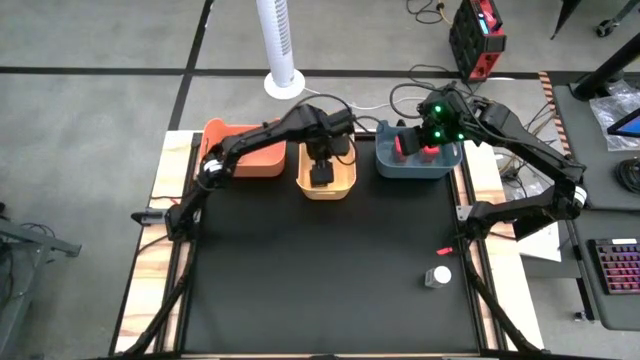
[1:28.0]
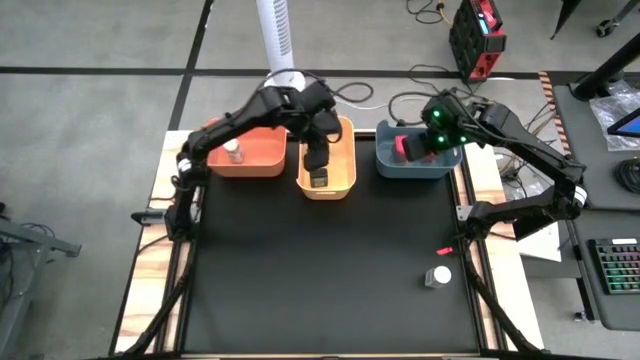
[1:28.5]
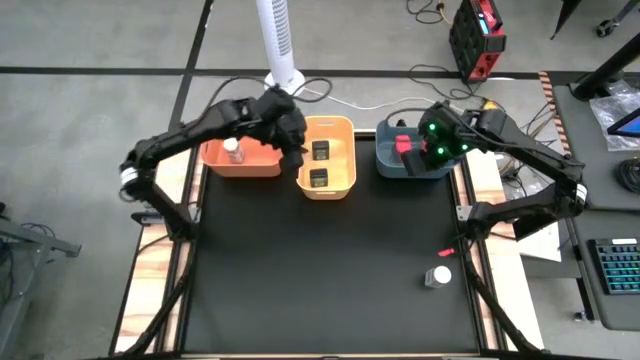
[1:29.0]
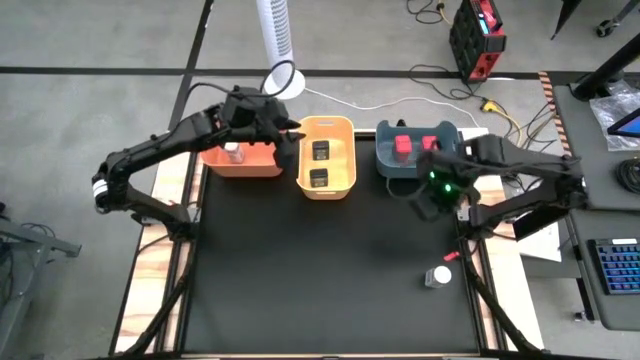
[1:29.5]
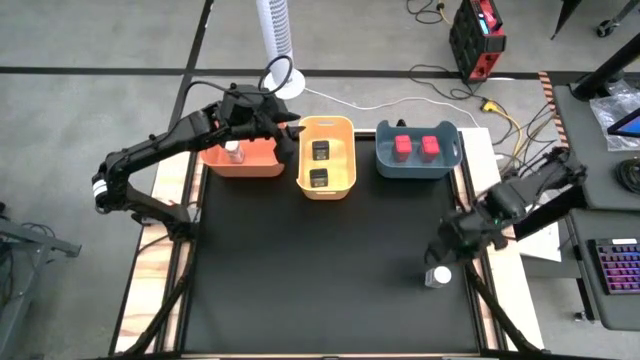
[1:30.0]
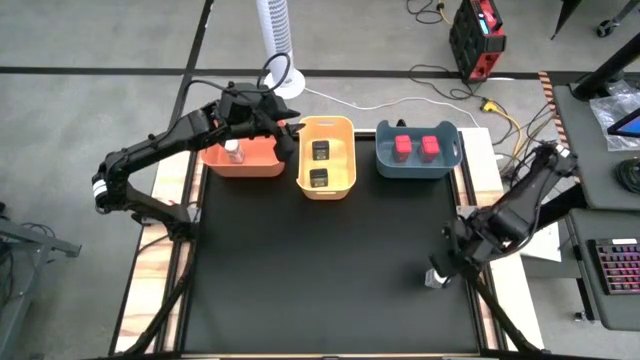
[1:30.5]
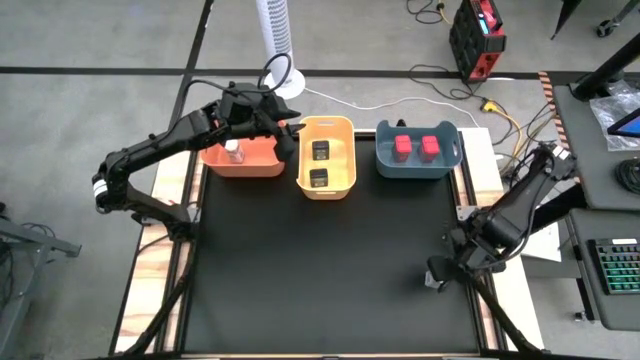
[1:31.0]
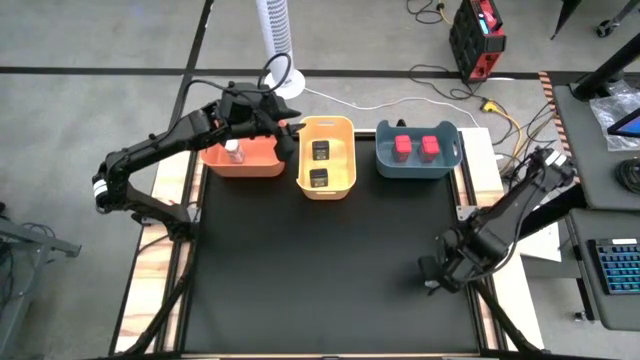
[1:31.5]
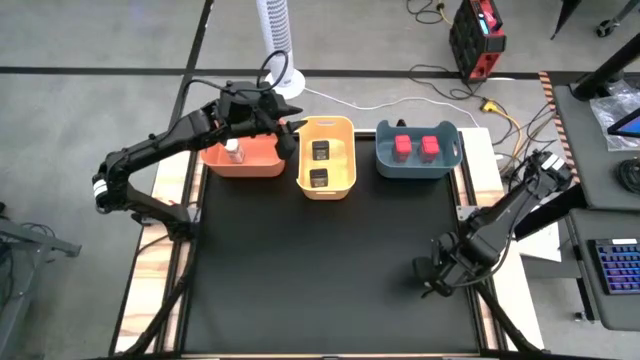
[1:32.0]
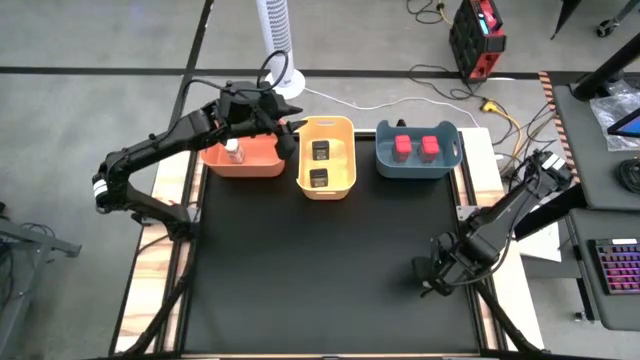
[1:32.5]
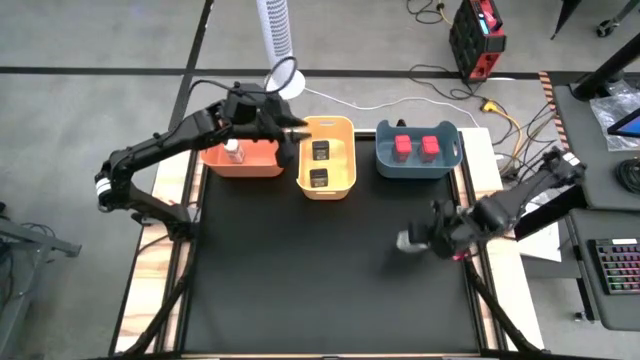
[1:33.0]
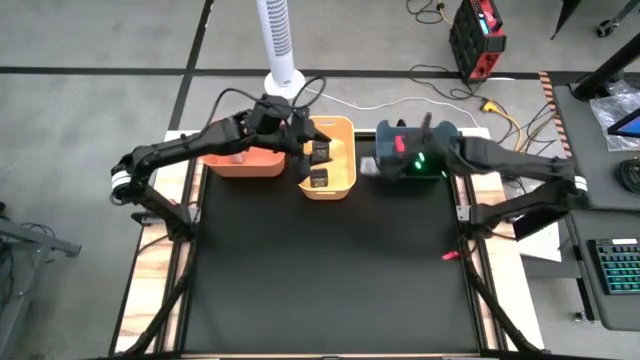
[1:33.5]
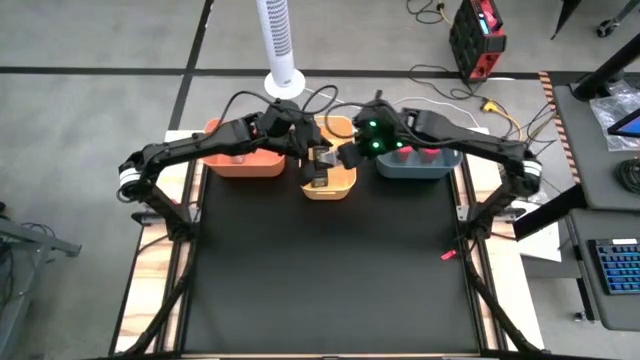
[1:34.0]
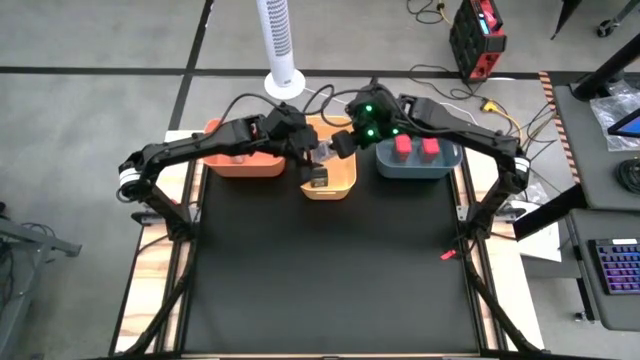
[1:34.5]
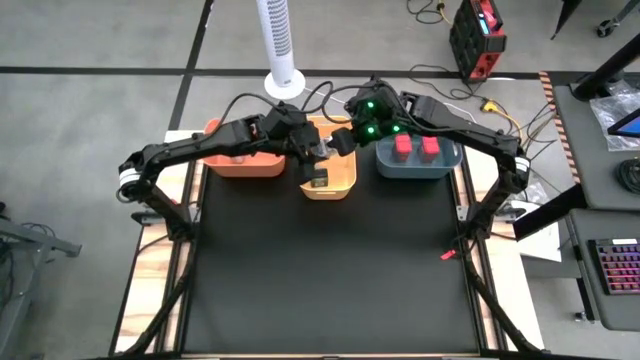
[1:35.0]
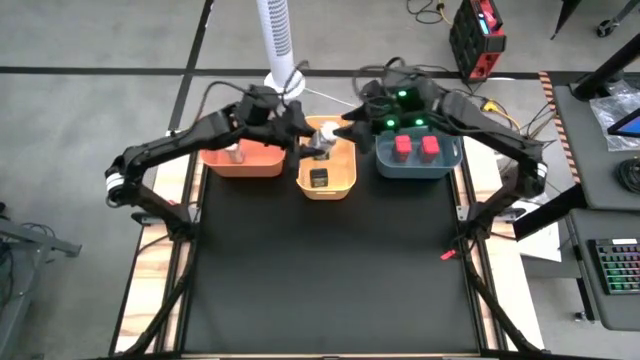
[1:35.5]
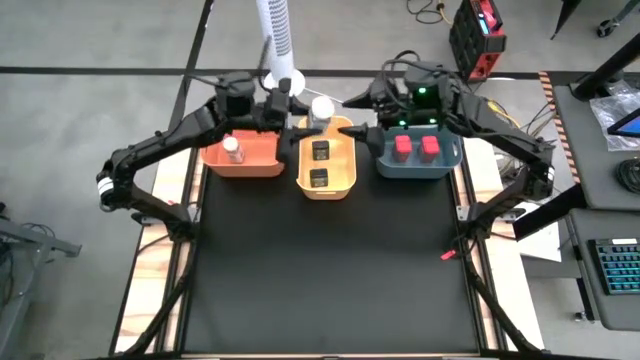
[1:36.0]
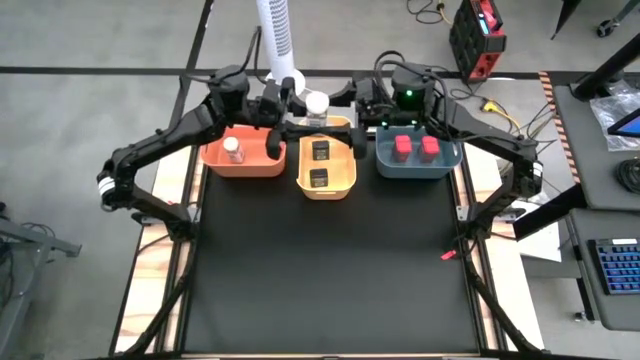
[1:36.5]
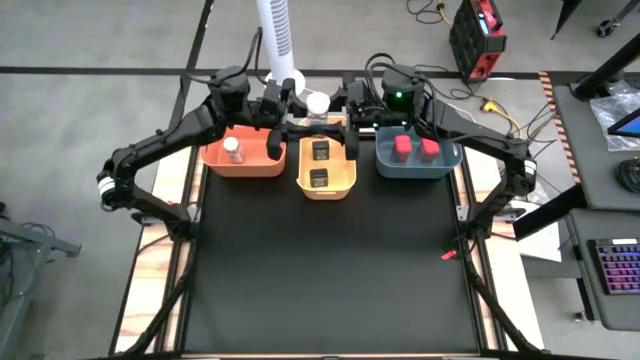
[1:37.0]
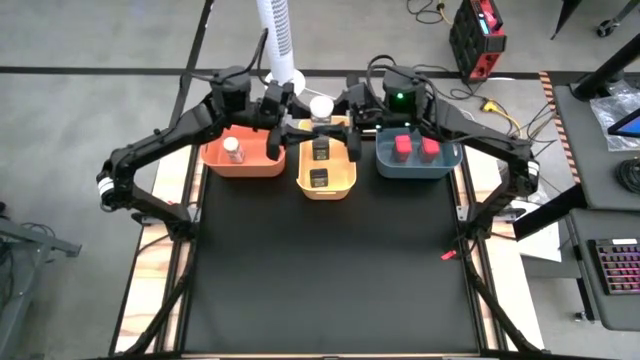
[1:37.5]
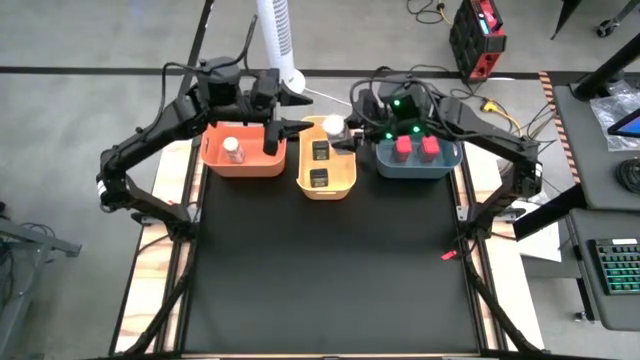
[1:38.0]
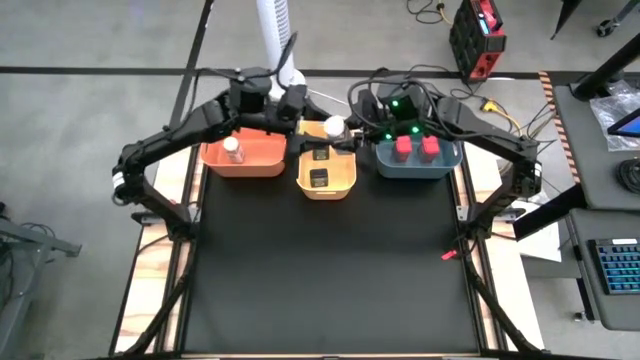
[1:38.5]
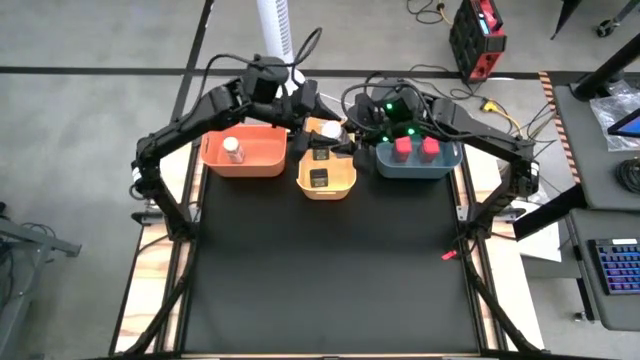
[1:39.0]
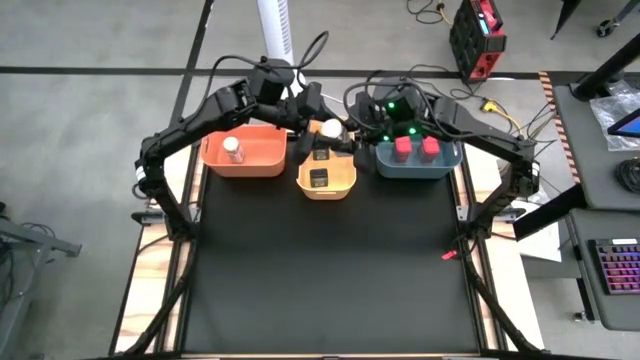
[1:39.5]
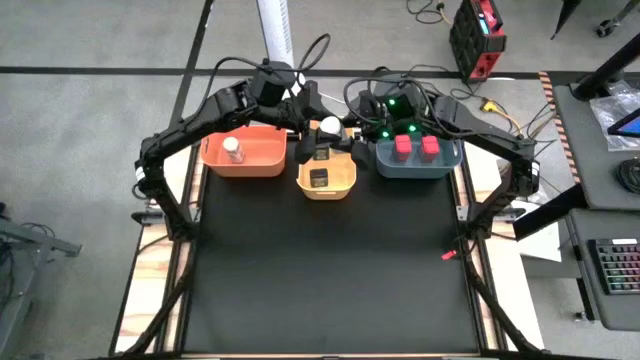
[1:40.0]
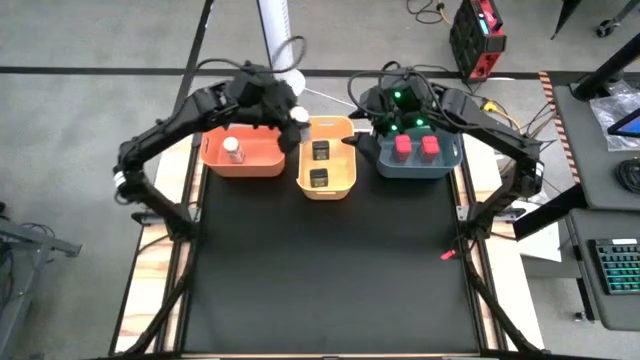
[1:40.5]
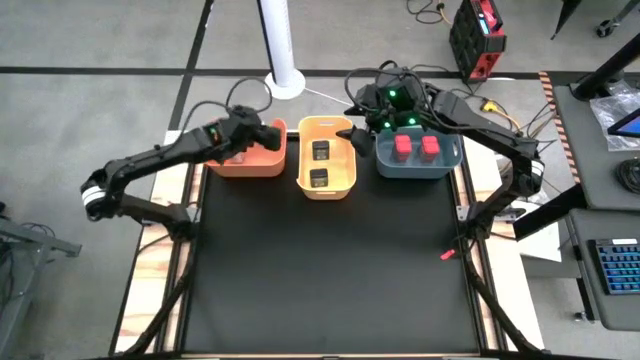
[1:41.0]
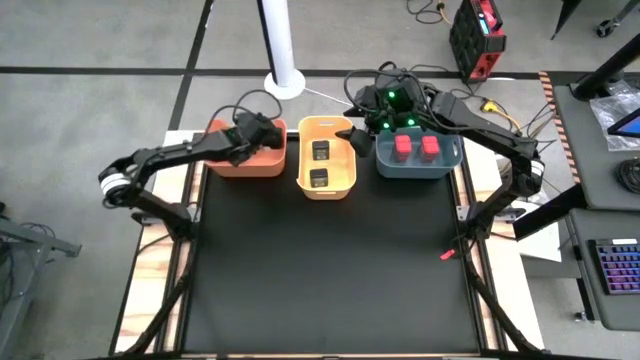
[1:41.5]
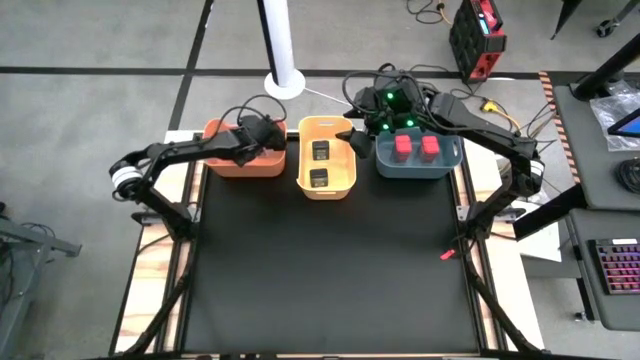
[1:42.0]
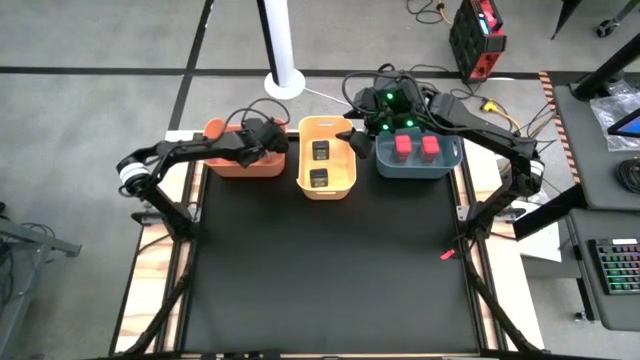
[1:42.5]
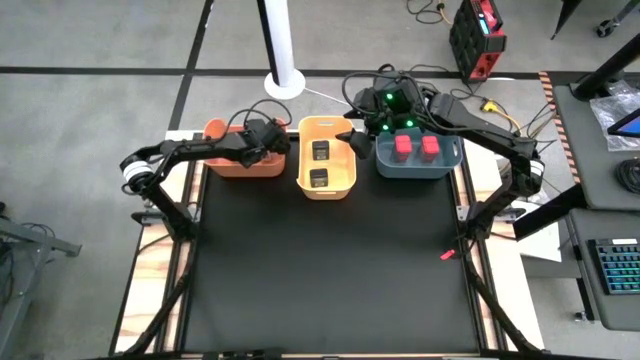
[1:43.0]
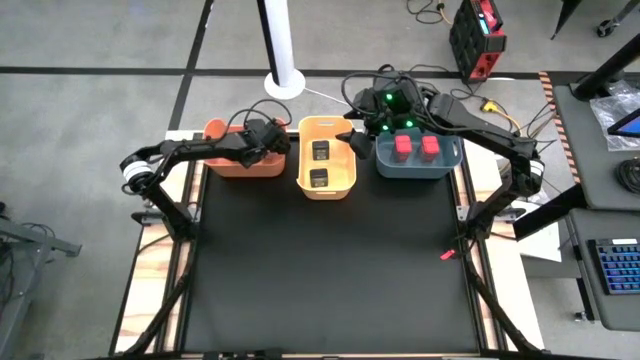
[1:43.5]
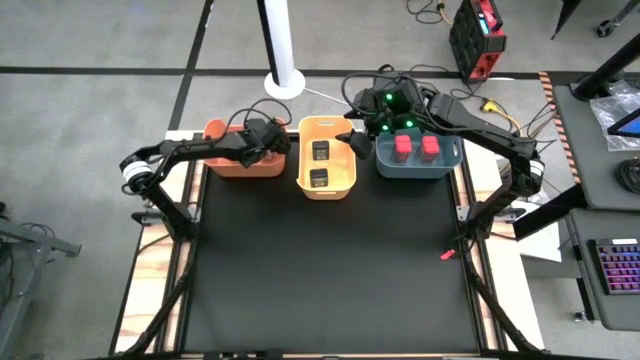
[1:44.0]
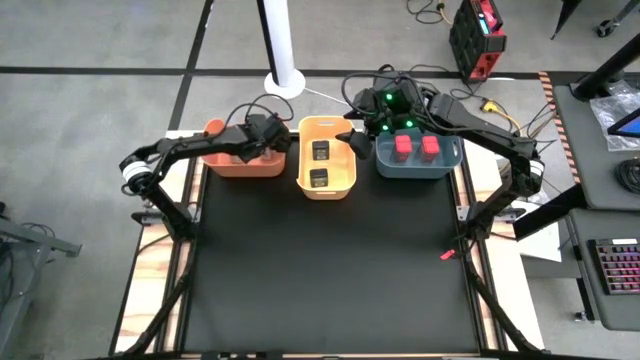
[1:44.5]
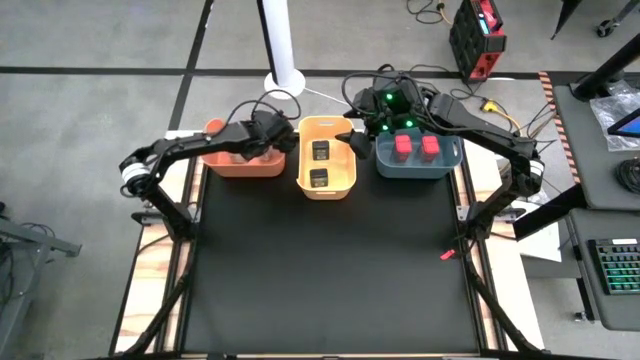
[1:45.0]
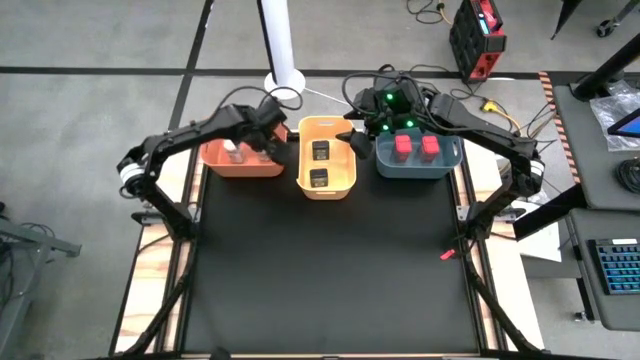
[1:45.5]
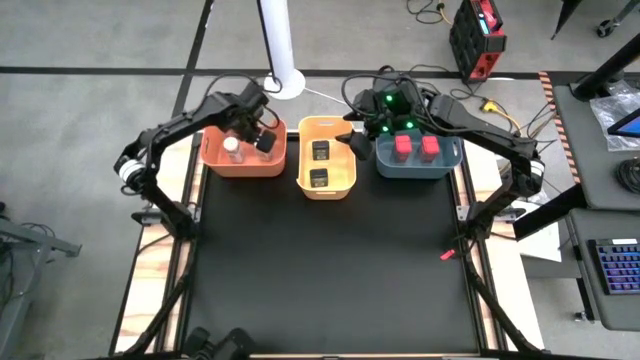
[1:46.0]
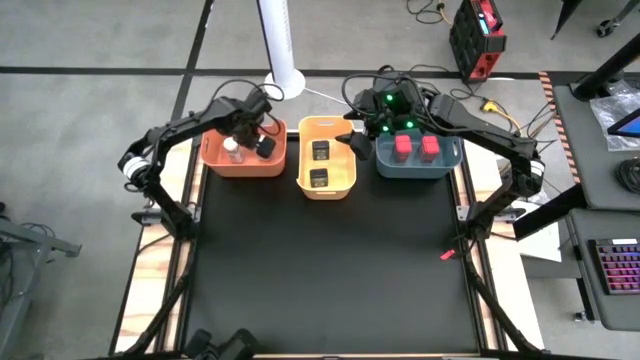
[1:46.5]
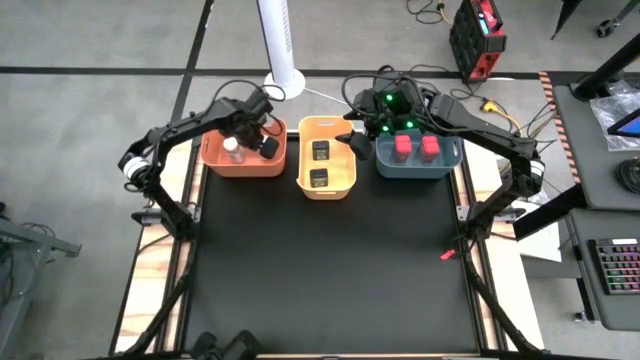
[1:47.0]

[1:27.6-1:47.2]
Task: Sort spices by type
Put the white spice bottle into the orange bin

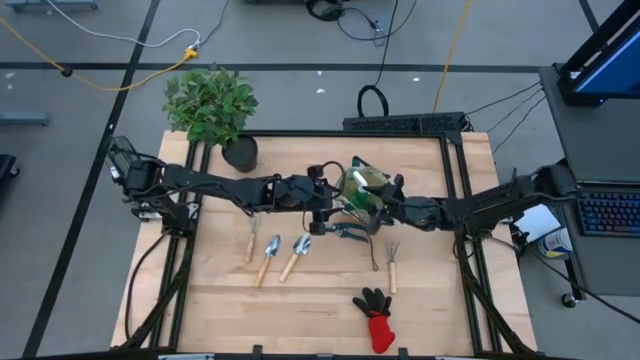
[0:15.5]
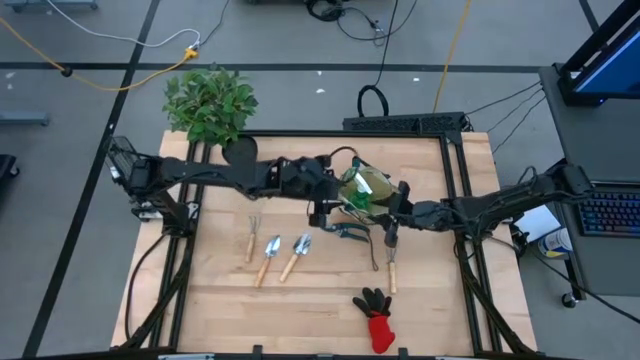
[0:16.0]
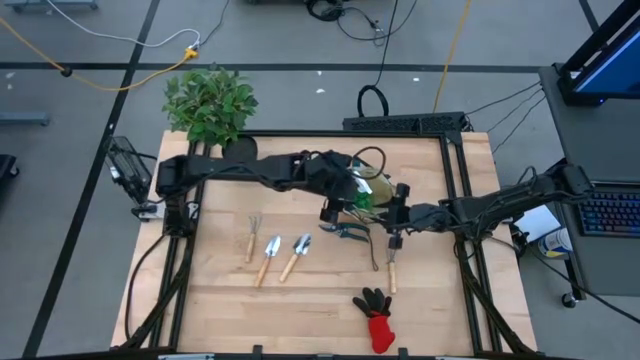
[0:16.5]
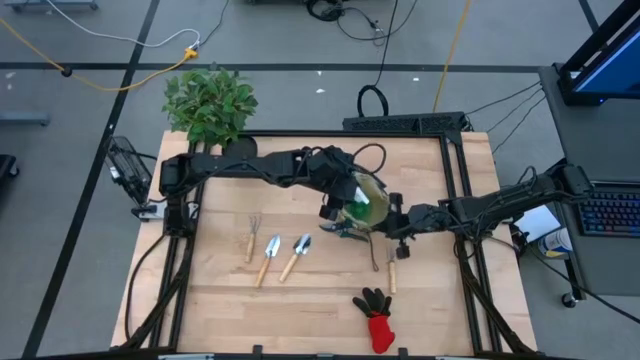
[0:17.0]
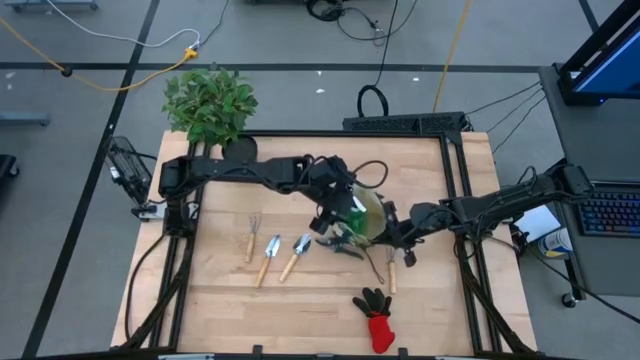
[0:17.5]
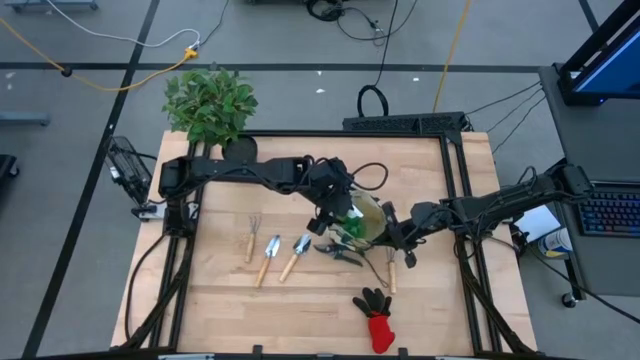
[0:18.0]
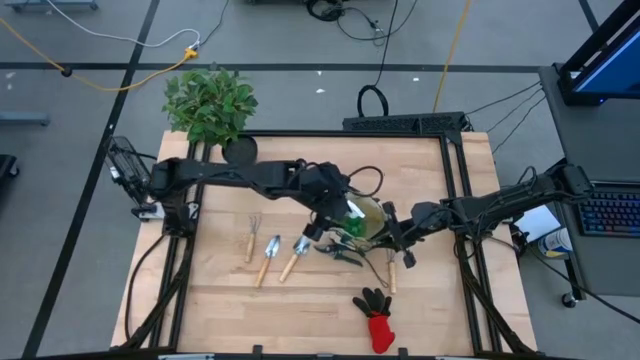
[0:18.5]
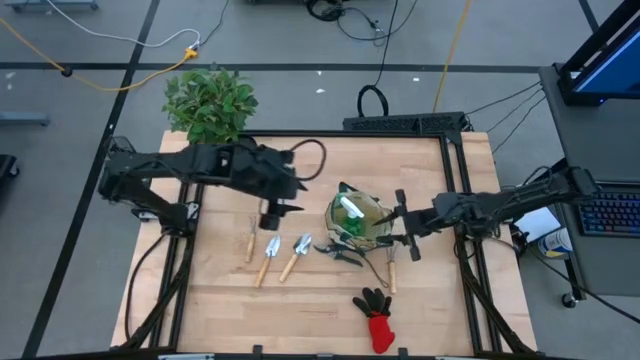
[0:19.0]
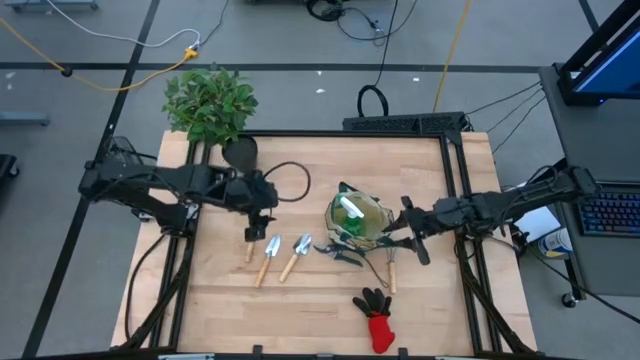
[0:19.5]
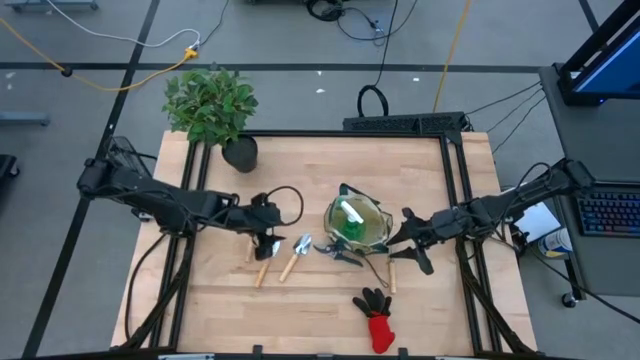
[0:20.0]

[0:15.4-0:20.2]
Task: Pick & Place Garden tools in Gardening bag
Move the gardening bag to the center of the table
